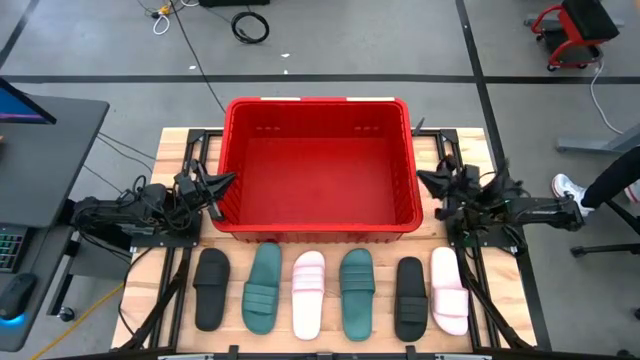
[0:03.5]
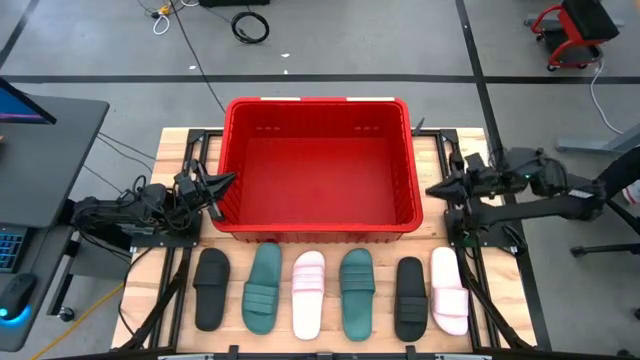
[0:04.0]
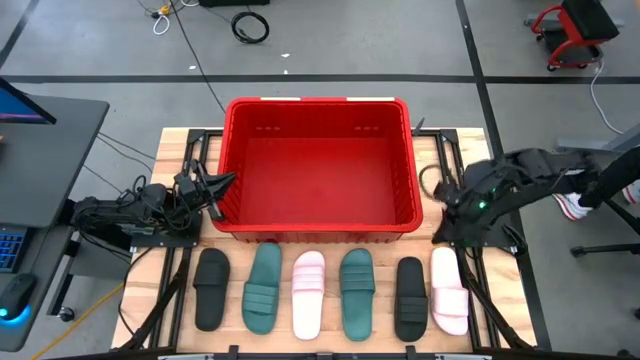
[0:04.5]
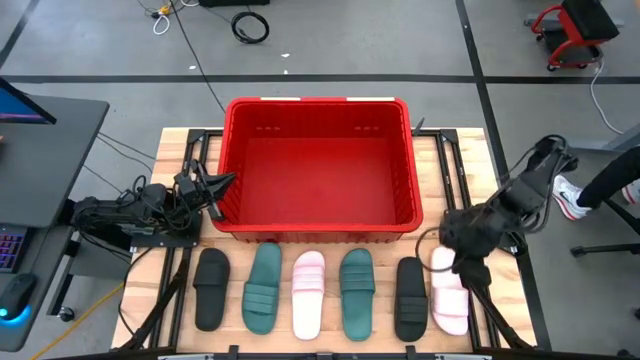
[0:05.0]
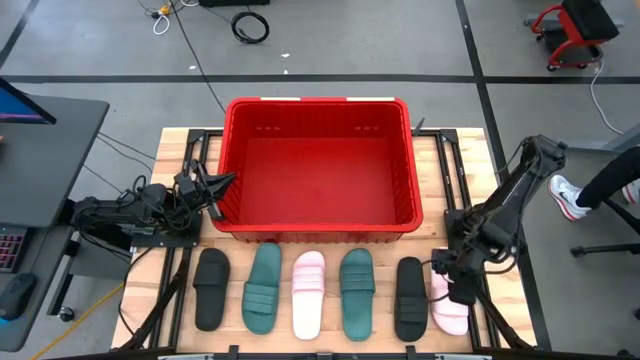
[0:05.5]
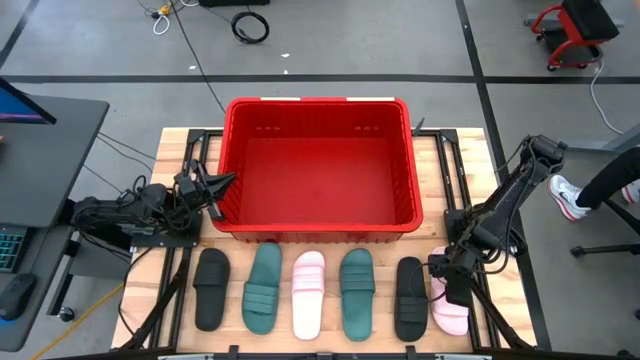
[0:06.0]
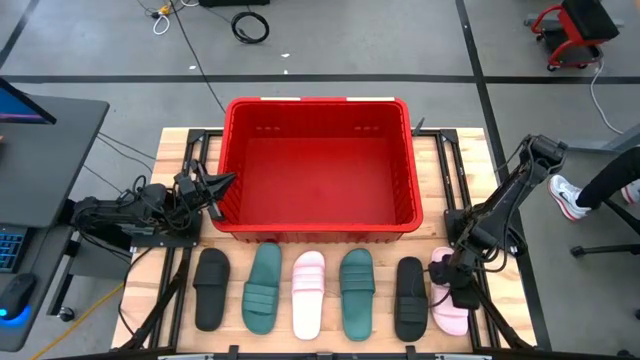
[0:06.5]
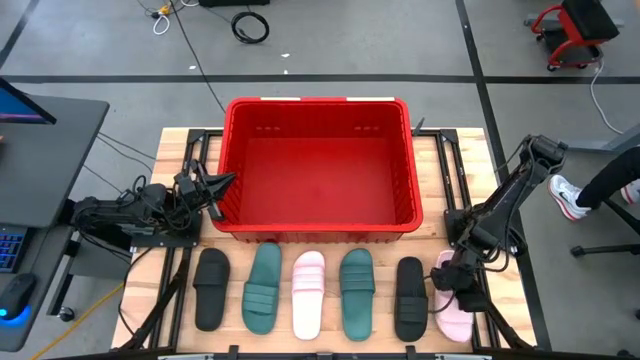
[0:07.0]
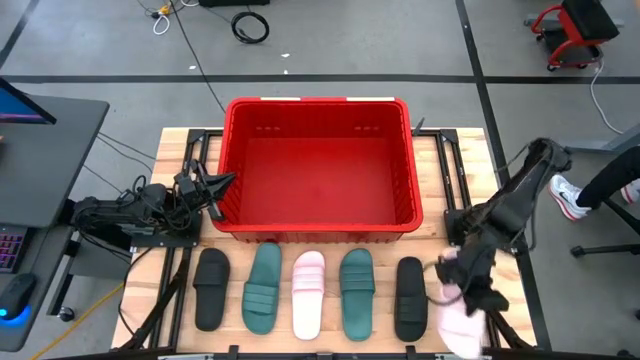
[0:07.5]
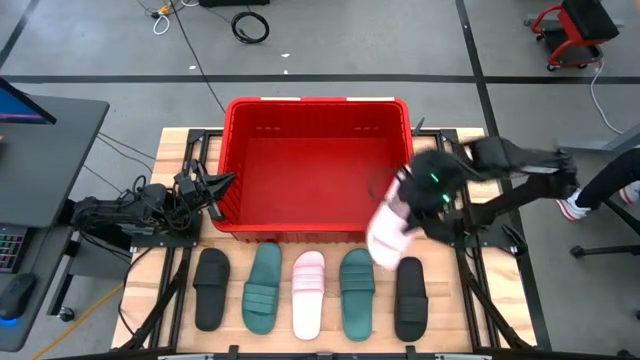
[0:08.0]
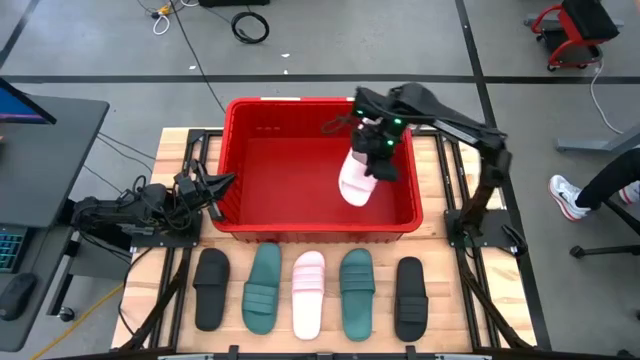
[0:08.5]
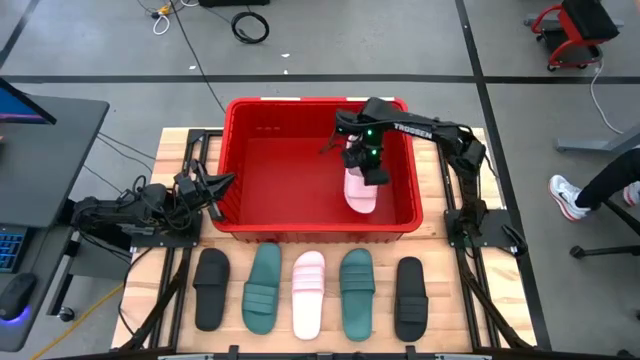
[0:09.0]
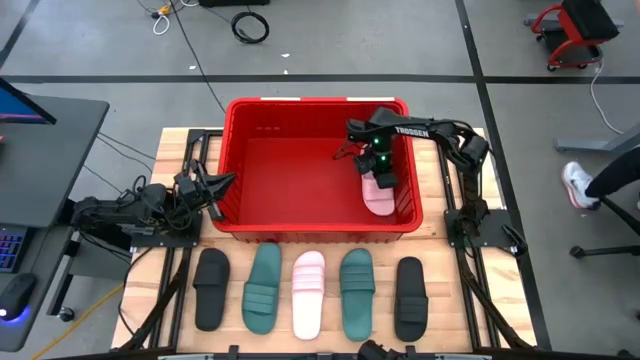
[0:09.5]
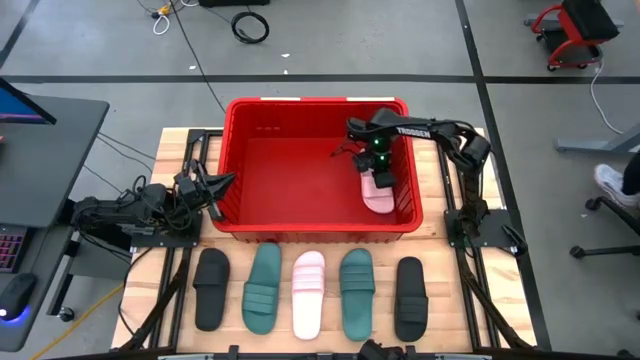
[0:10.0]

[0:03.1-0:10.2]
Task: Pick and place slides into bin
Put the right pink slipper into the red bin

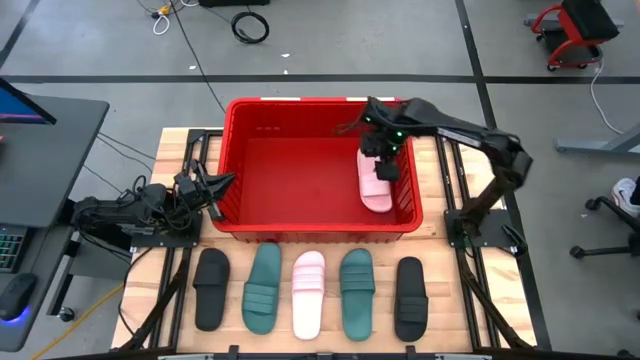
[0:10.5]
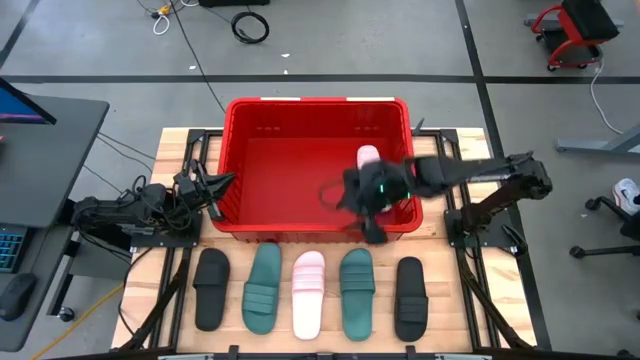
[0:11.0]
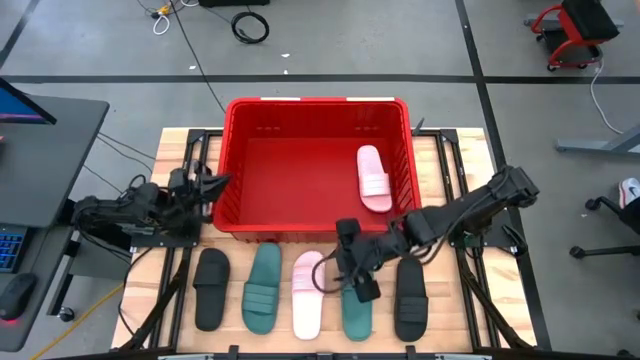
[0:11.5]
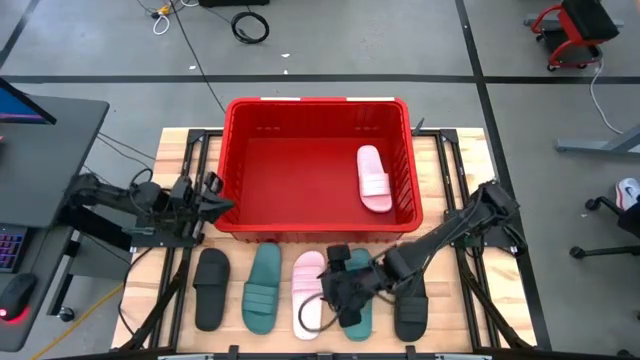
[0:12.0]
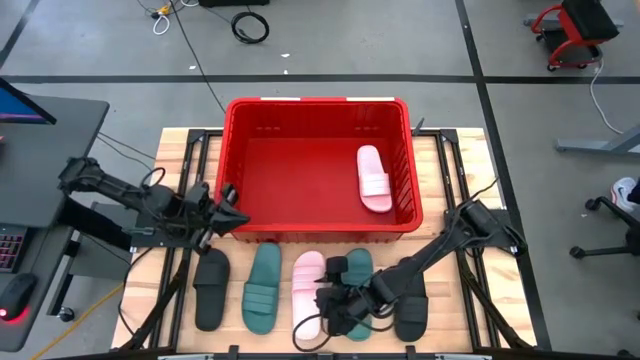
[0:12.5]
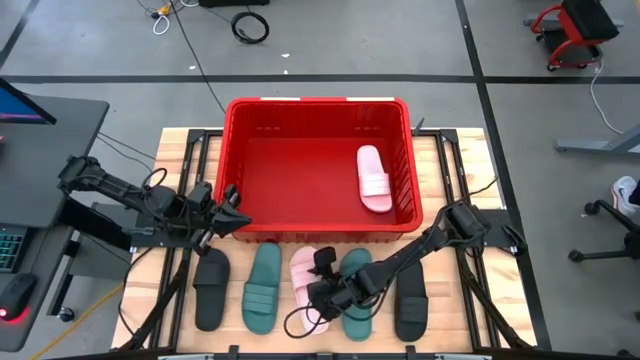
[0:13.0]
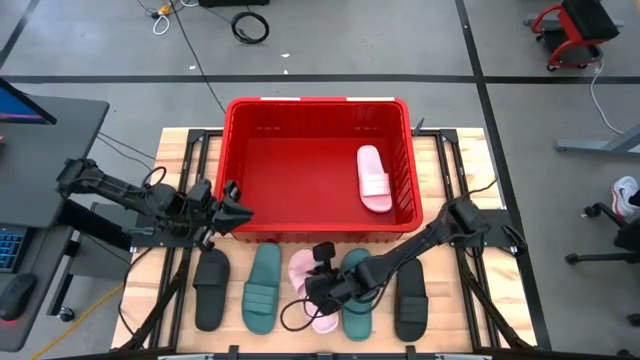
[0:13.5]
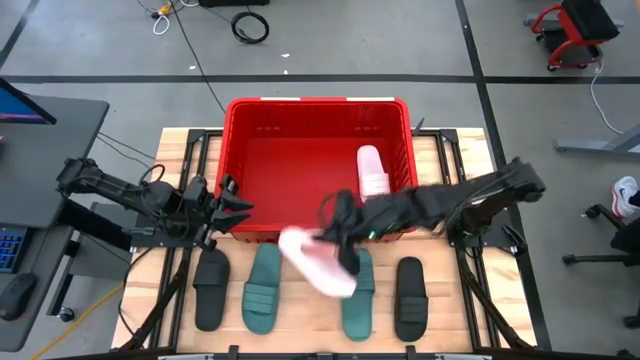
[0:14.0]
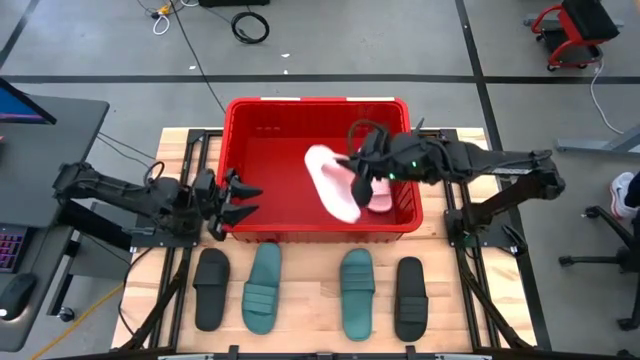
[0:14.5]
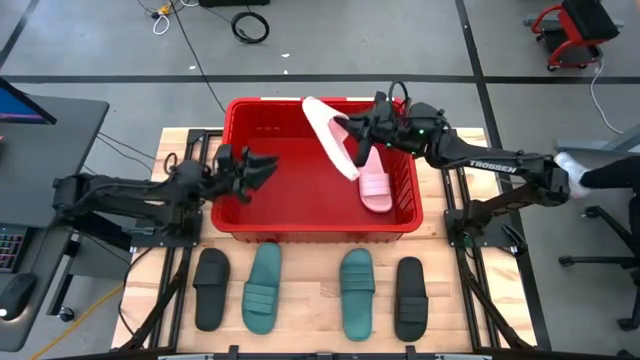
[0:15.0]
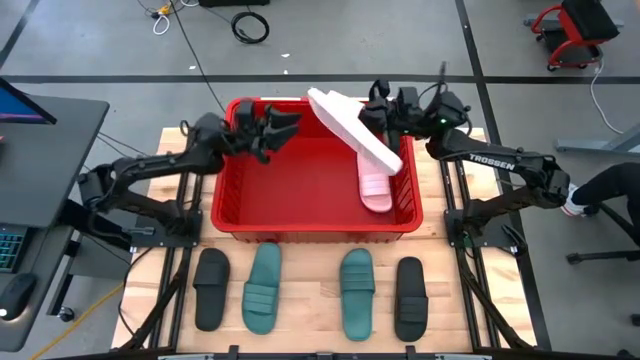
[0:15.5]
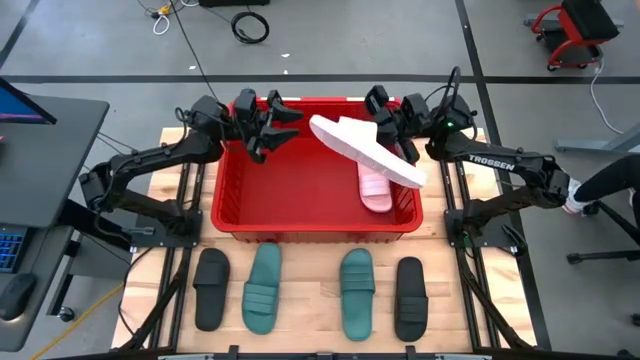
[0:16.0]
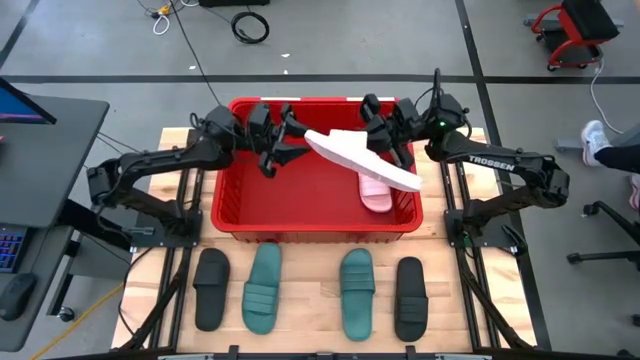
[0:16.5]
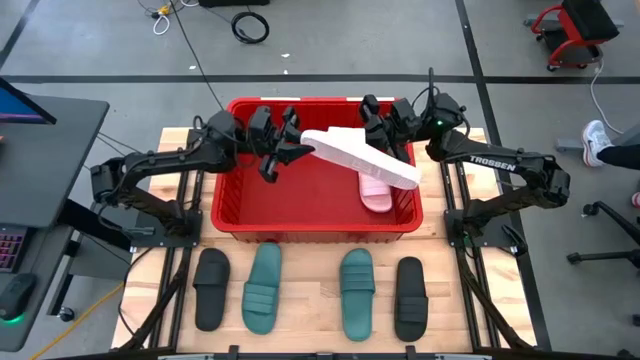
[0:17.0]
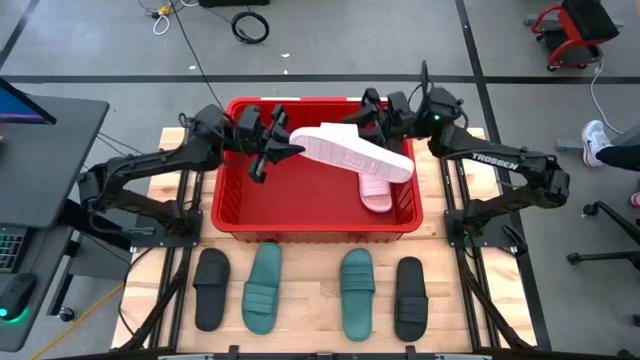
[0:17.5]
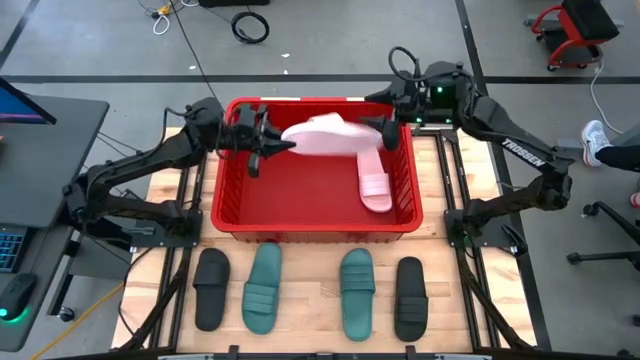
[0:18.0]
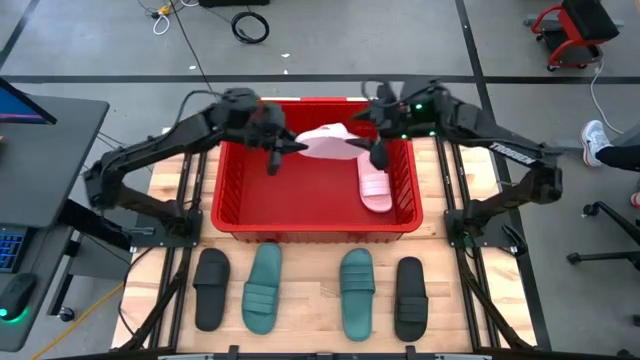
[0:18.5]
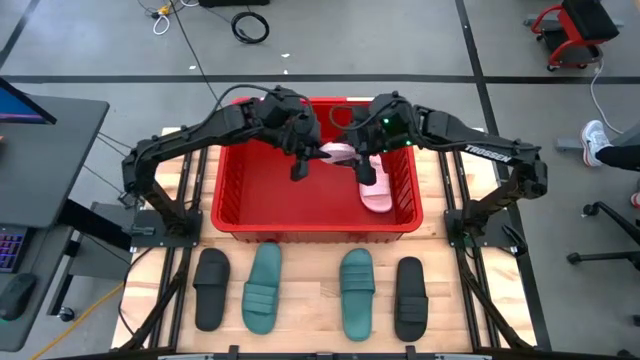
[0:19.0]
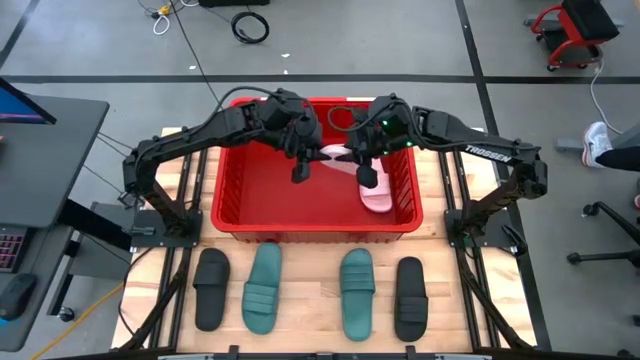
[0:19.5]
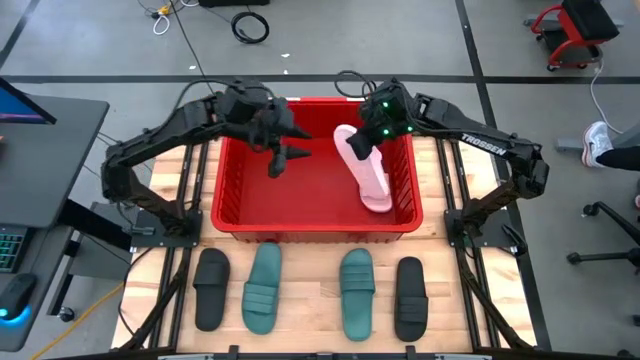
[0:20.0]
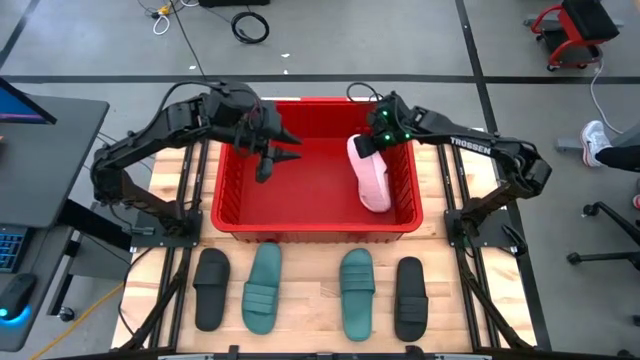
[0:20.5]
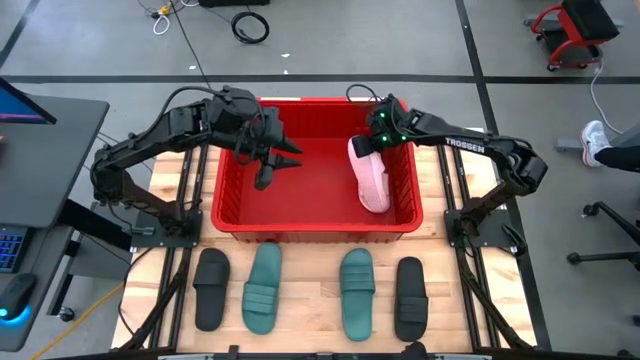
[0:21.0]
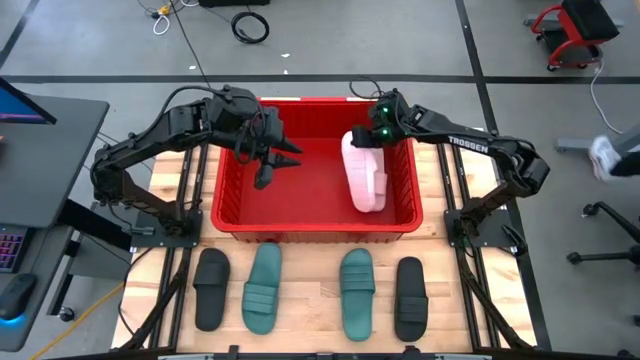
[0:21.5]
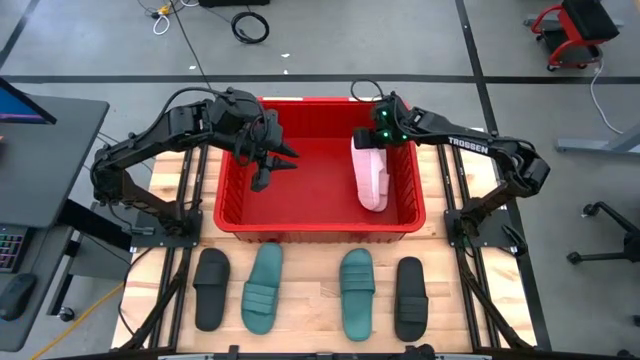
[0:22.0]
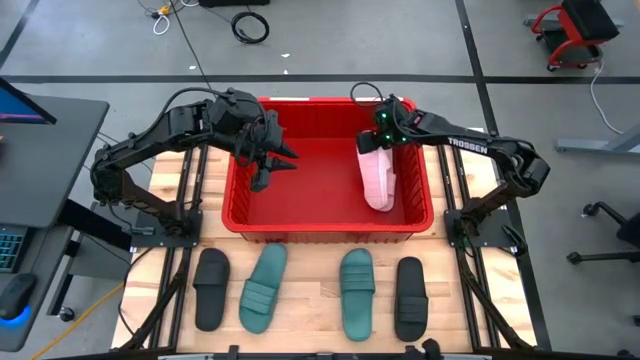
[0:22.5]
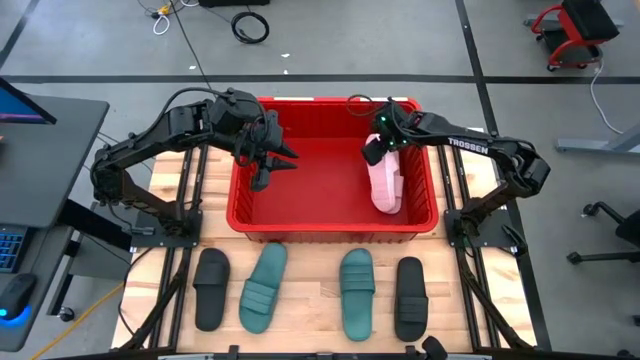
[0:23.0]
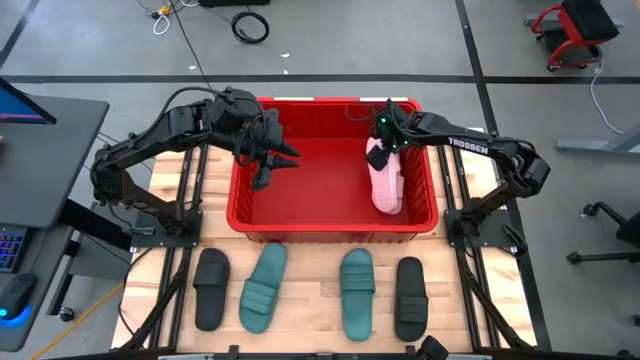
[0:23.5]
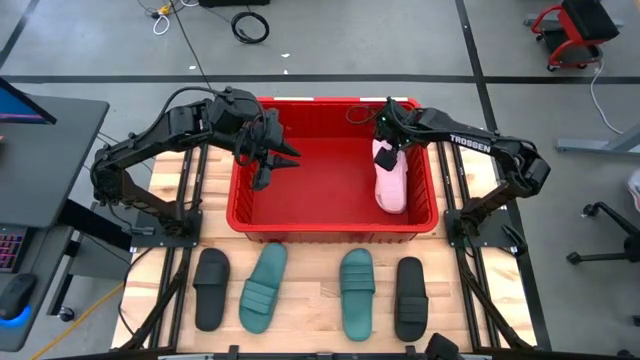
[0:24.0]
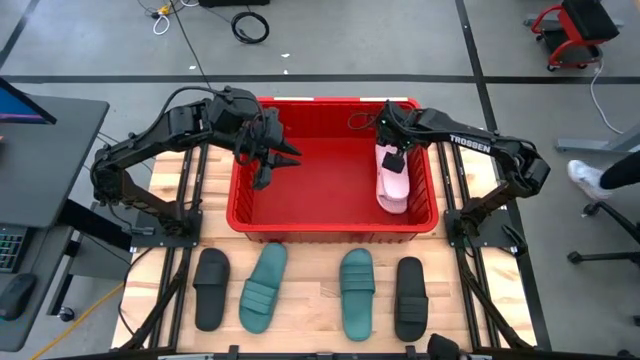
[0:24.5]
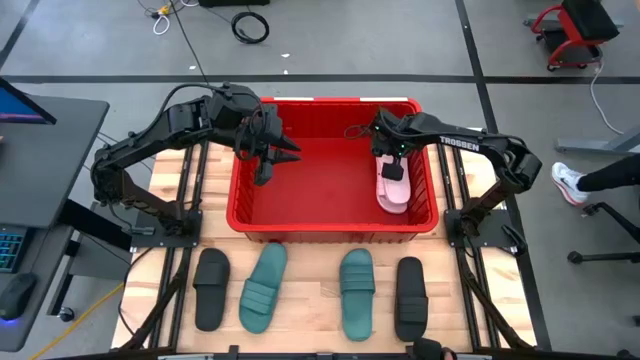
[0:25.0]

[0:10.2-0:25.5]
Stack the pink slipper on top of the other pink slipper in the red bin
